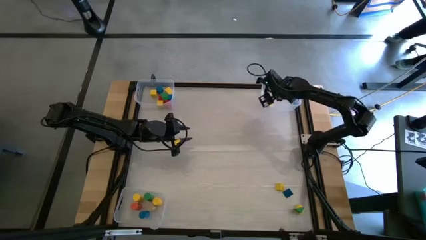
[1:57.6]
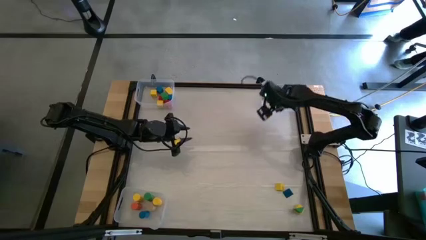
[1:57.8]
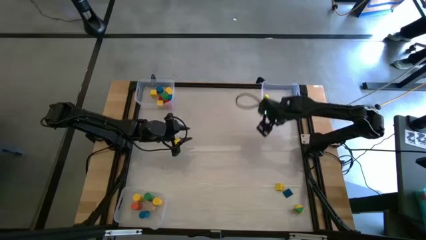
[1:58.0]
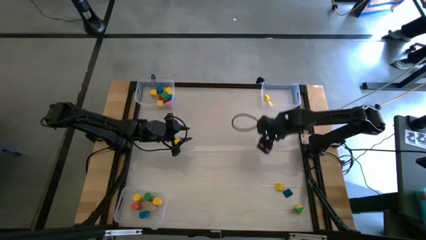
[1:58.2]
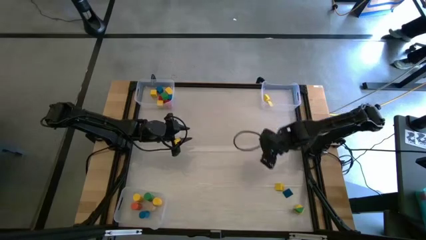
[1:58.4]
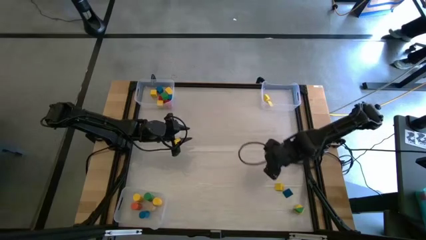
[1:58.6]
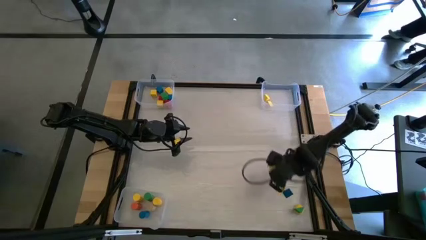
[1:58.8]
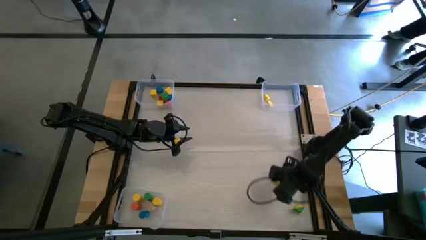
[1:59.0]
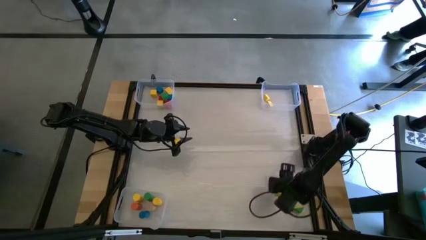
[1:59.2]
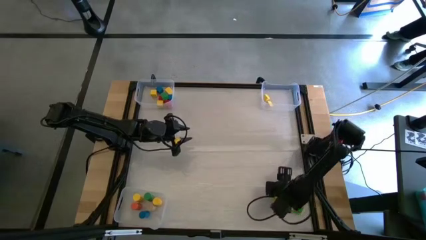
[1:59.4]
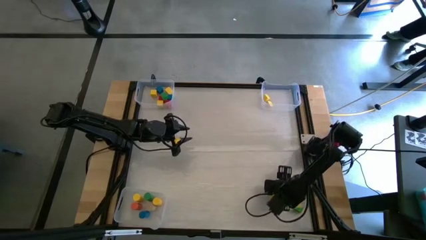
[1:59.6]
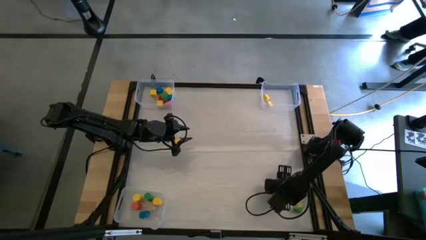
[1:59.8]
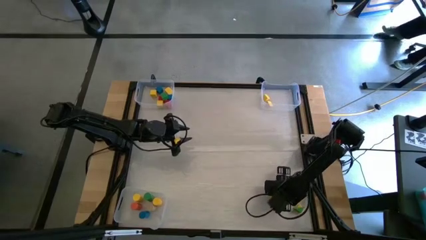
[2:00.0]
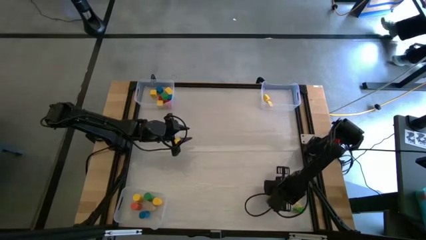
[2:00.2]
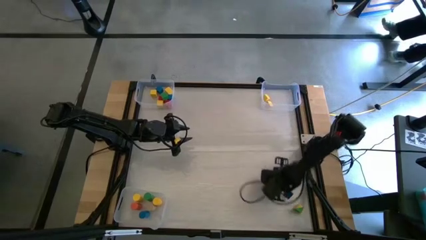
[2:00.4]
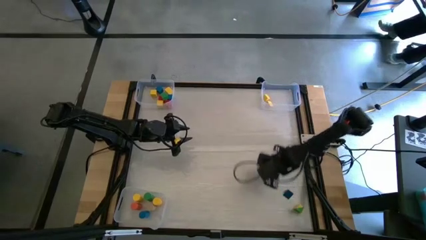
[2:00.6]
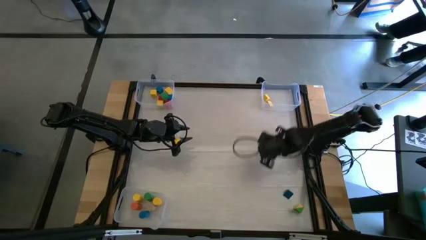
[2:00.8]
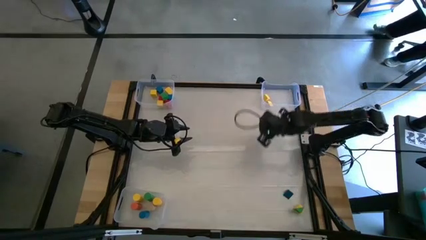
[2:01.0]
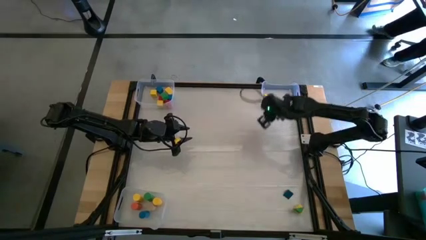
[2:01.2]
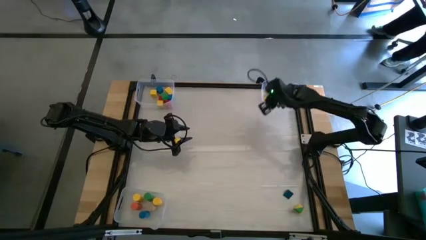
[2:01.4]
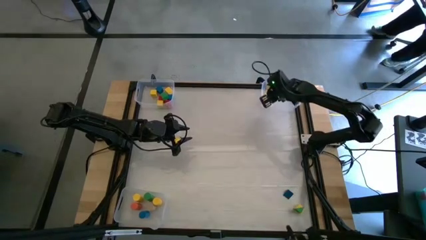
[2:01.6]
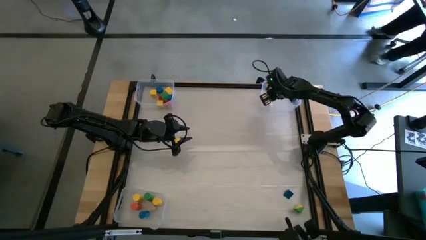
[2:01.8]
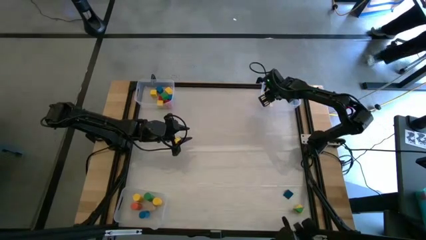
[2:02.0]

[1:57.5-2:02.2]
Task: Sort blocks by size
Put the right yellow triangular prism block into the top right transparent bin

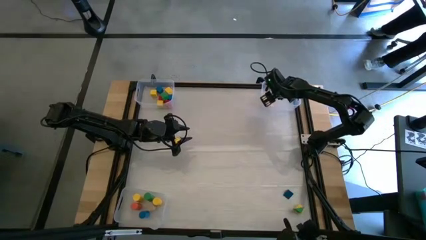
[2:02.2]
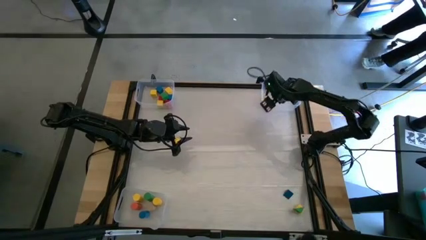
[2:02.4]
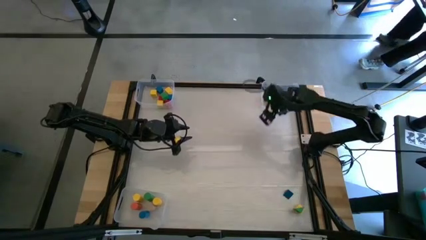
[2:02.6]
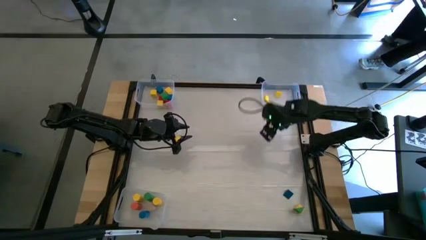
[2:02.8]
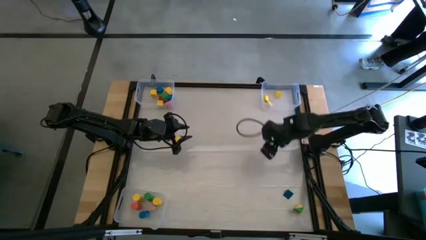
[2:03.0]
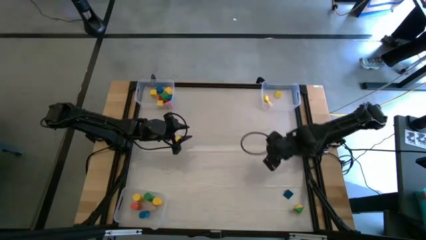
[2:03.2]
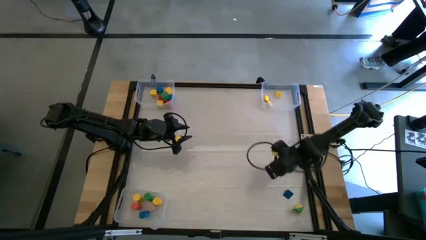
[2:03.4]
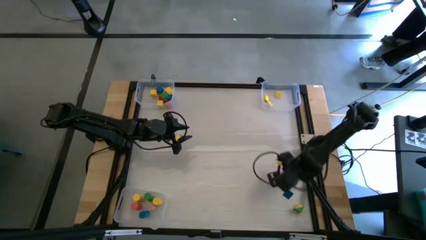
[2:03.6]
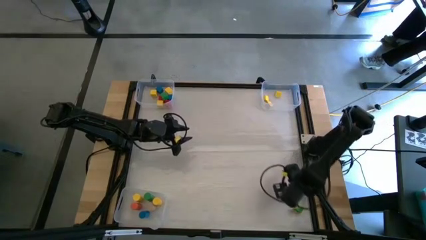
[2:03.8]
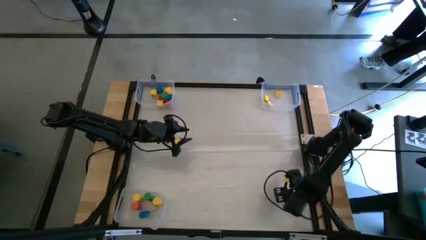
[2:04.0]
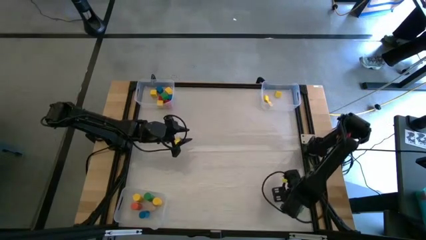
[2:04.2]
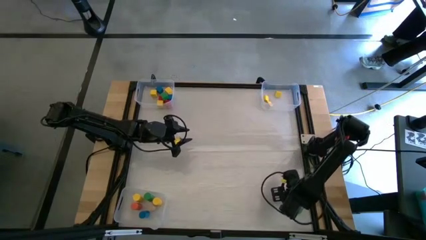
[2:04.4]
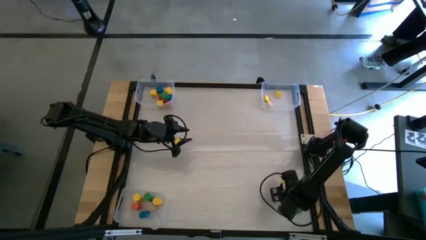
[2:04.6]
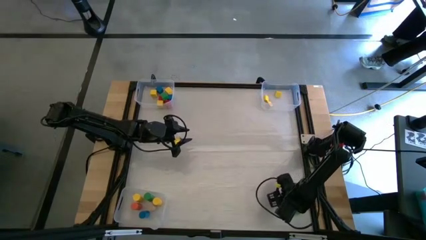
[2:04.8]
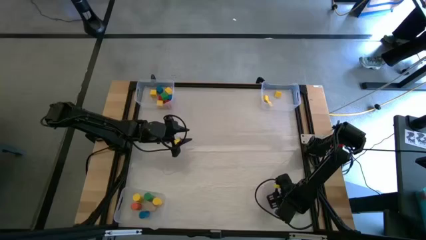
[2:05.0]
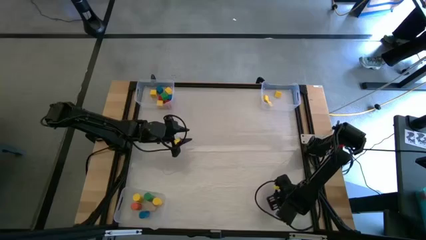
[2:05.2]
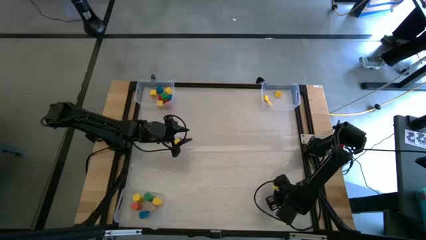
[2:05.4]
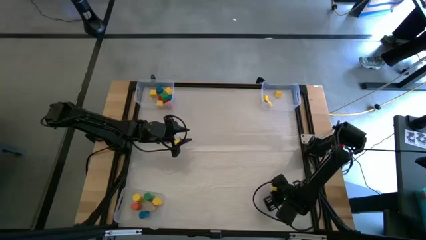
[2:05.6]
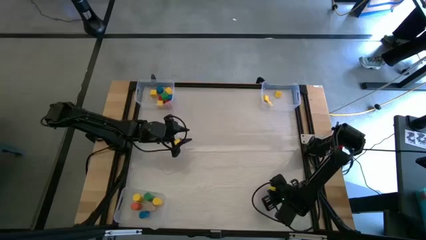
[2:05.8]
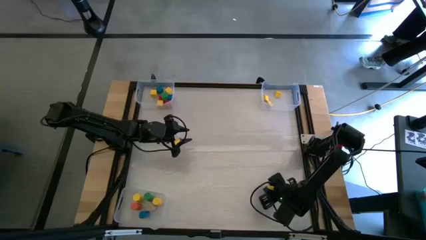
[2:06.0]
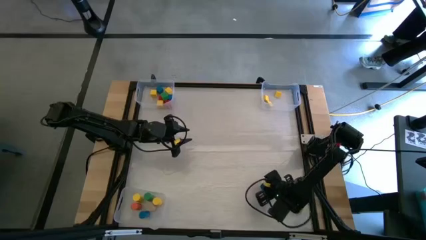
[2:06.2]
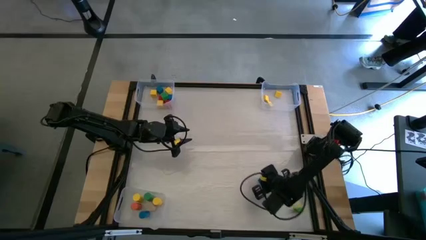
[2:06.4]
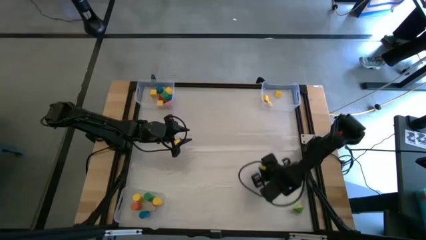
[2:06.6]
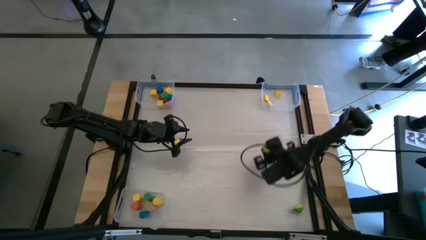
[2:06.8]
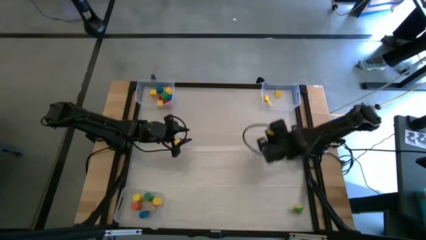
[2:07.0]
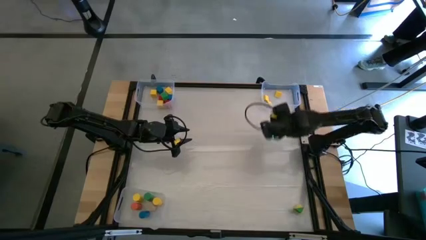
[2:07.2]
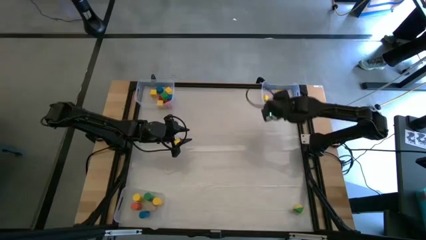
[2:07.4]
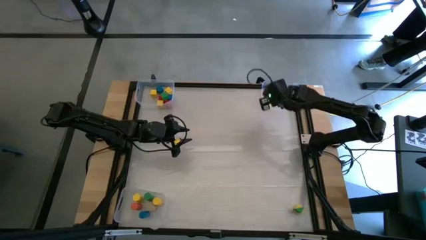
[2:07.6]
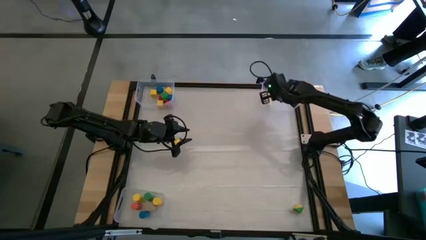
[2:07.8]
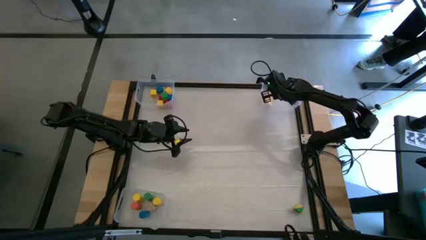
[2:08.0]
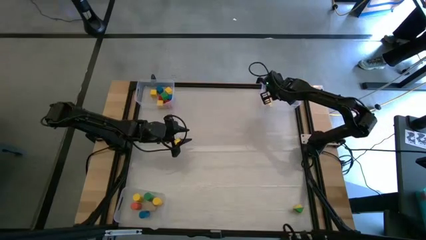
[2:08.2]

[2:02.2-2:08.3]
Put the blue triangular prism block into the top right transparent bin

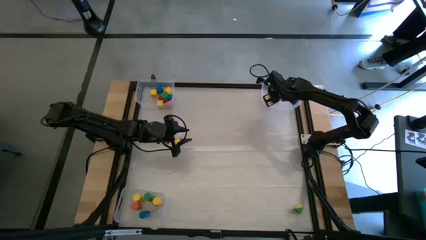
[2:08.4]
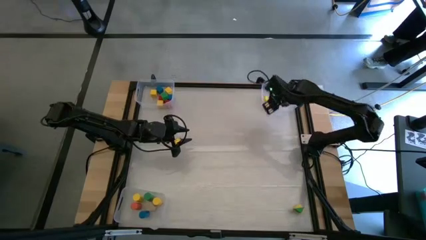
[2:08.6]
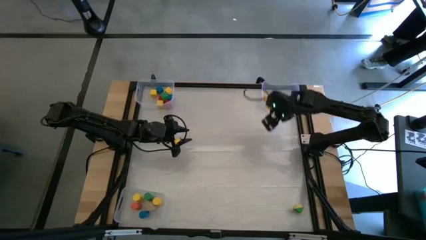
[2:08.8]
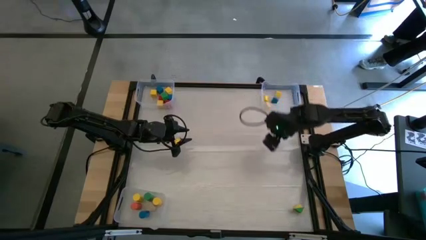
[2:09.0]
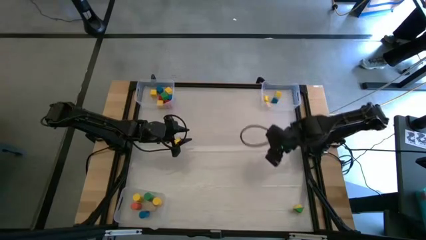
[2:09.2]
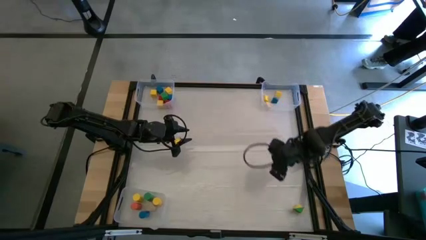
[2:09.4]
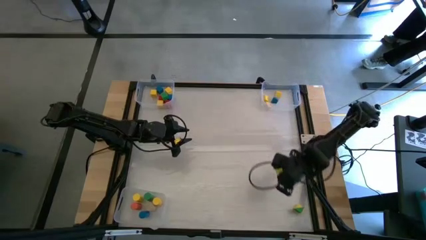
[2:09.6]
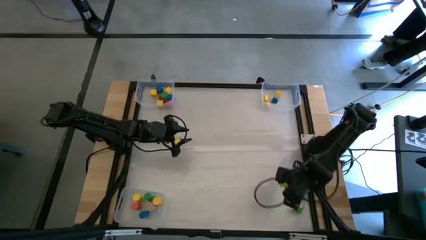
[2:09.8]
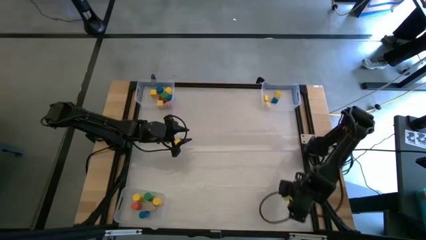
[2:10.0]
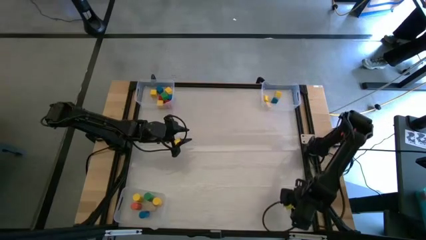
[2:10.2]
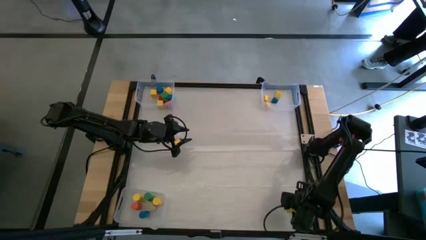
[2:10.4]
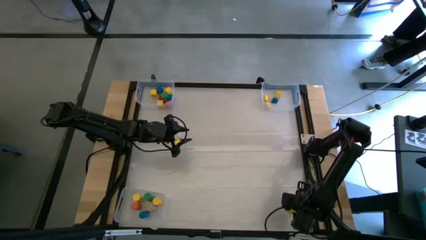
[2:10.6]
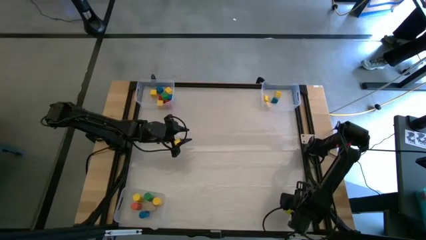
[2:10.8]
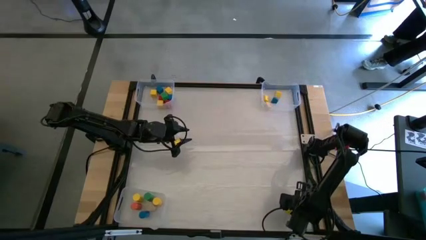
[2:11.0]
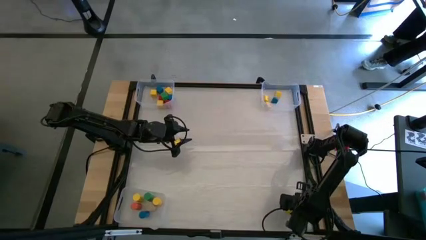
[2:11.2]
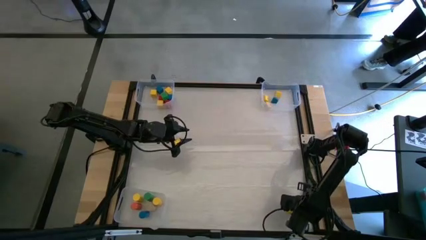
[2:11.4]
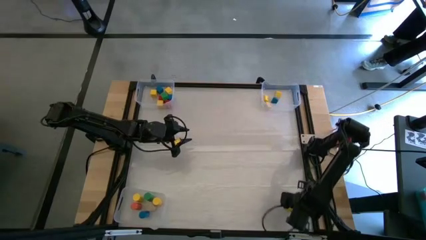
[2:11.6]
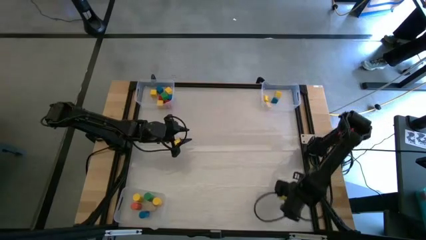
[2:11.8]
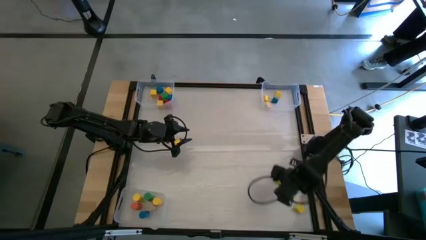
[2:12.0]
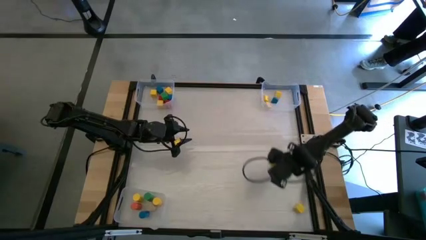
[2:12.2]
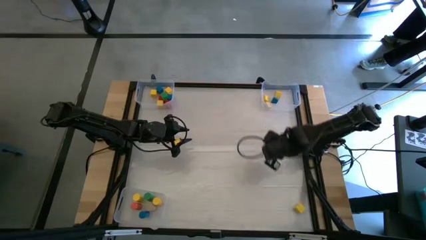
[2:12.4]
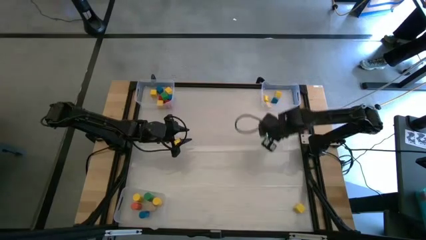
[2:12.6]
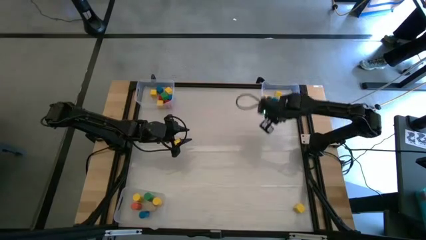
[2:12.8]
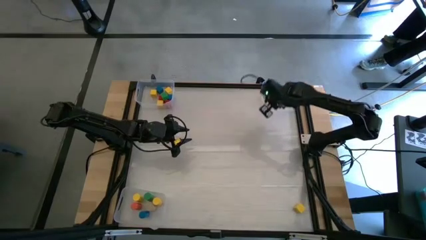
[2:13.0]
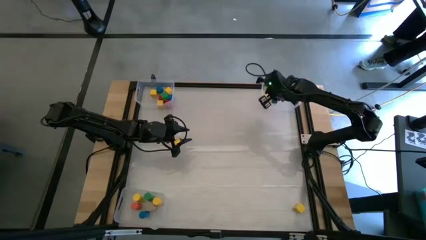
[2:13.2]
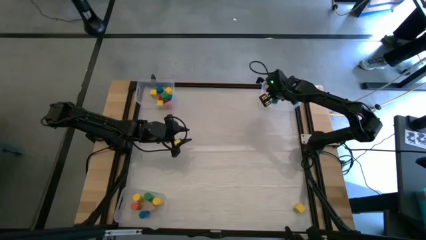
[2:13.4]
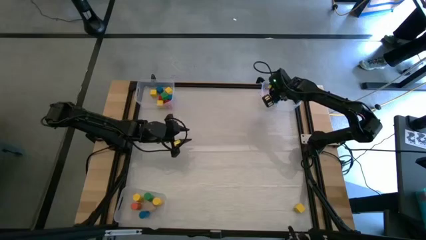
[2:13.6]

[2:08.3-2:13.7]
Put the green triangular prism block into the top right transparent bin
